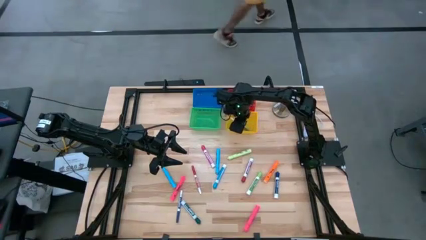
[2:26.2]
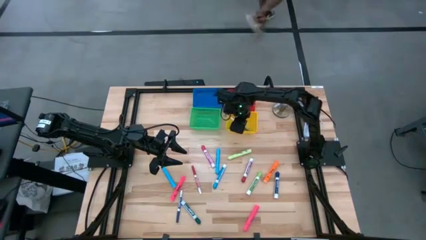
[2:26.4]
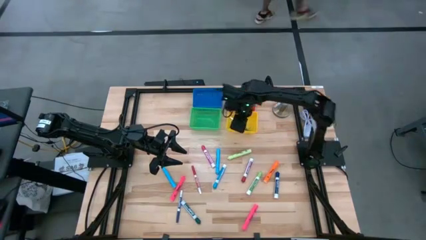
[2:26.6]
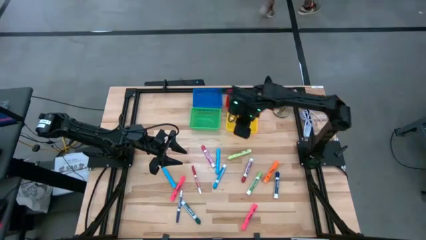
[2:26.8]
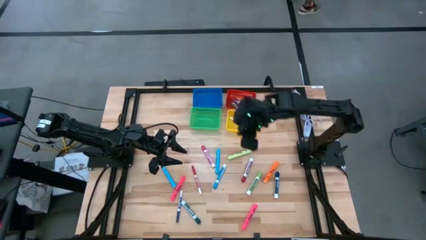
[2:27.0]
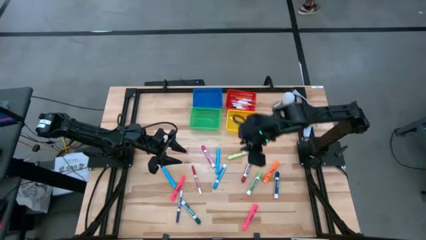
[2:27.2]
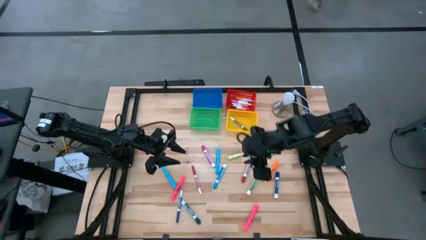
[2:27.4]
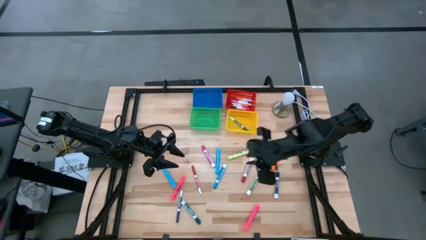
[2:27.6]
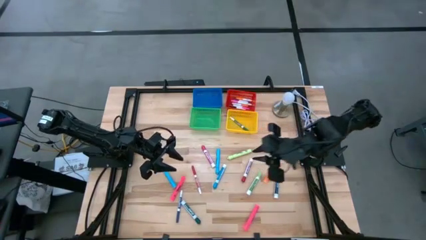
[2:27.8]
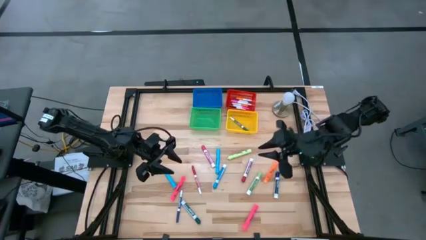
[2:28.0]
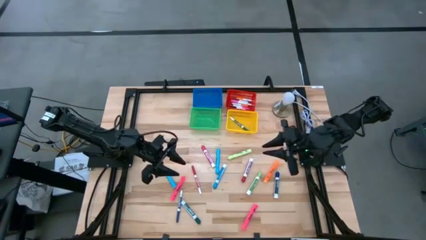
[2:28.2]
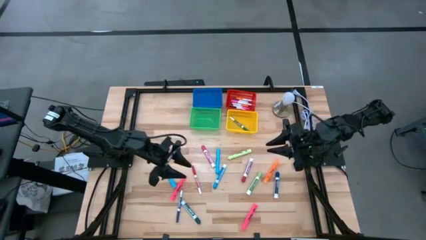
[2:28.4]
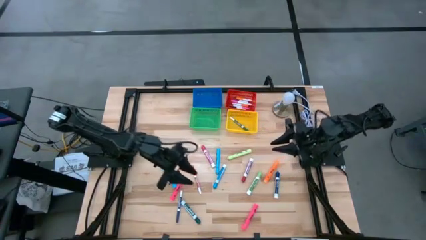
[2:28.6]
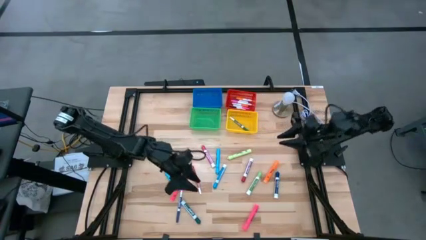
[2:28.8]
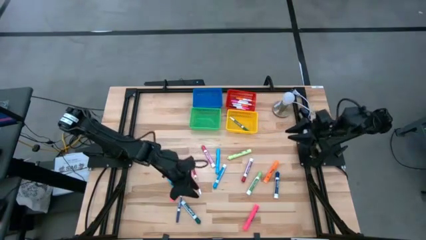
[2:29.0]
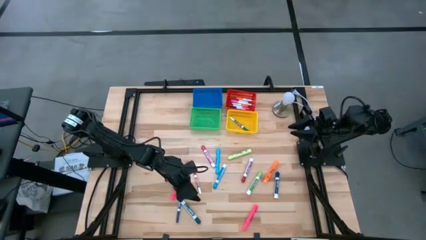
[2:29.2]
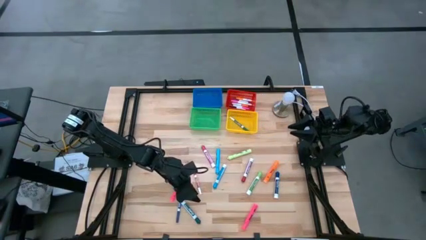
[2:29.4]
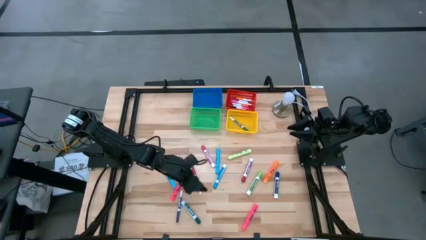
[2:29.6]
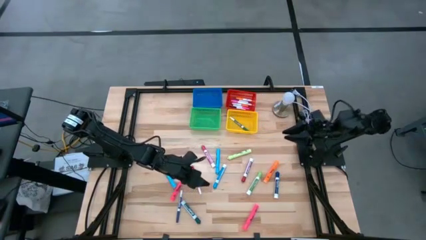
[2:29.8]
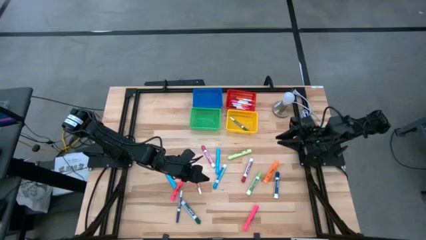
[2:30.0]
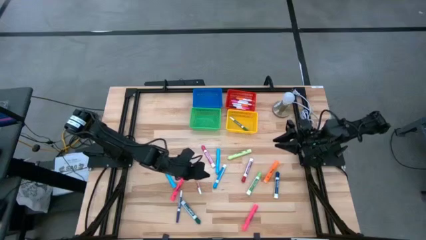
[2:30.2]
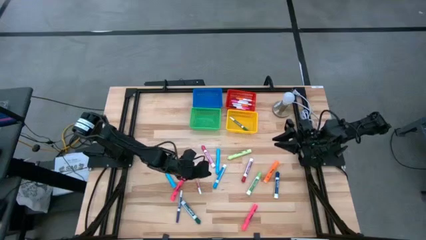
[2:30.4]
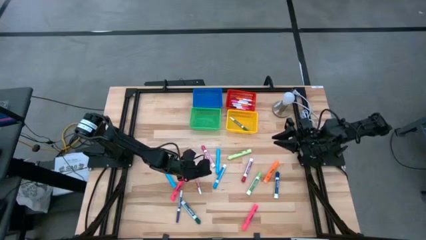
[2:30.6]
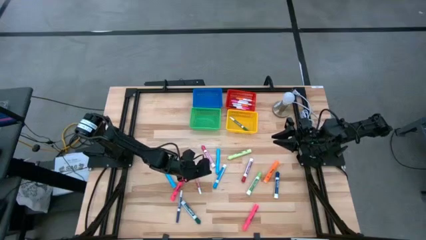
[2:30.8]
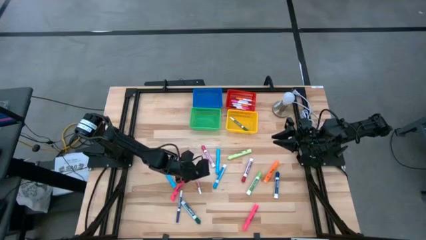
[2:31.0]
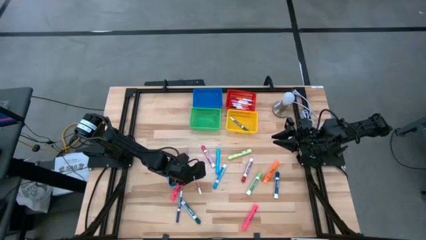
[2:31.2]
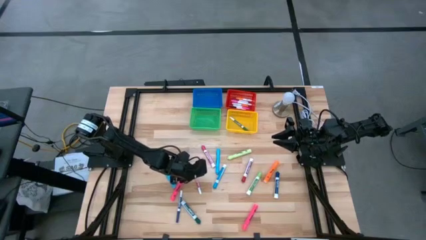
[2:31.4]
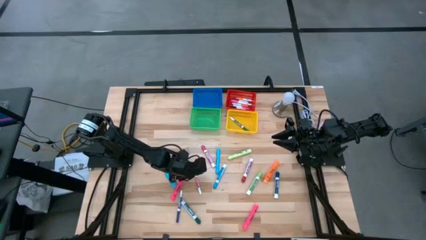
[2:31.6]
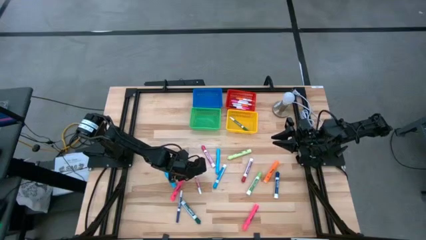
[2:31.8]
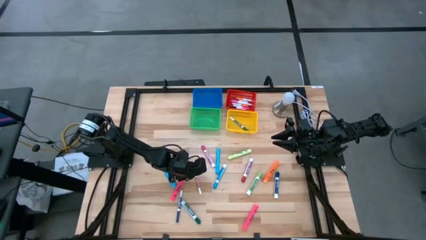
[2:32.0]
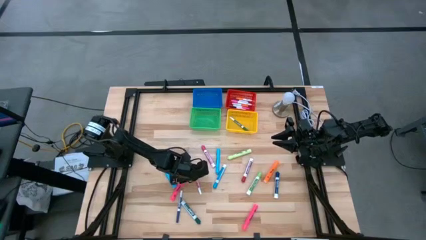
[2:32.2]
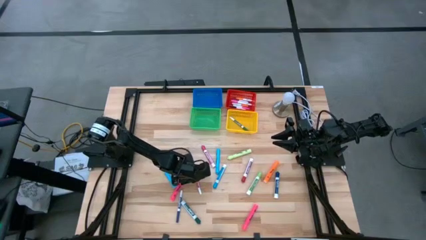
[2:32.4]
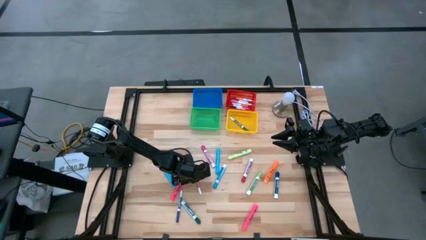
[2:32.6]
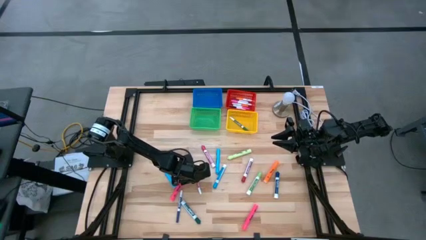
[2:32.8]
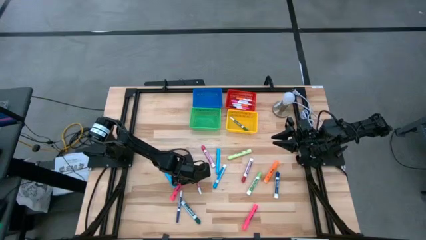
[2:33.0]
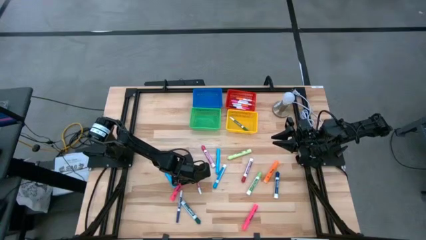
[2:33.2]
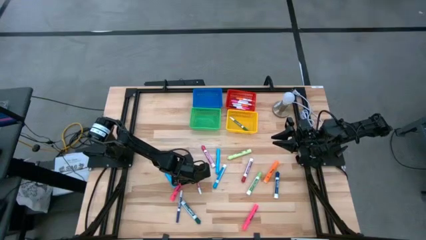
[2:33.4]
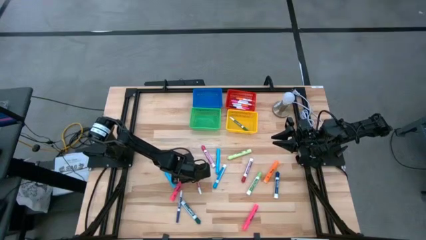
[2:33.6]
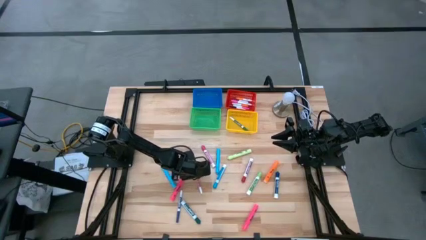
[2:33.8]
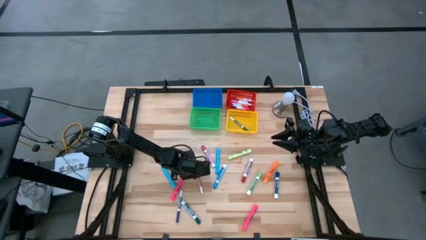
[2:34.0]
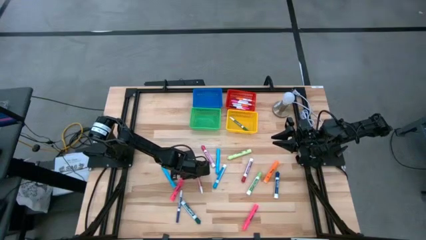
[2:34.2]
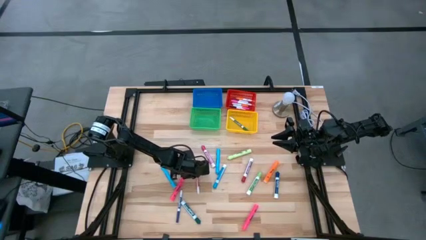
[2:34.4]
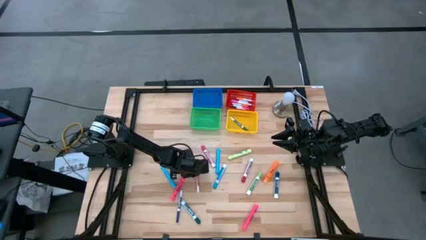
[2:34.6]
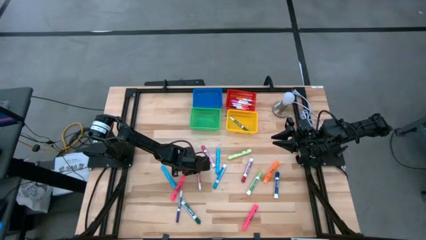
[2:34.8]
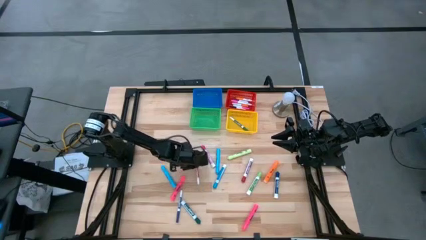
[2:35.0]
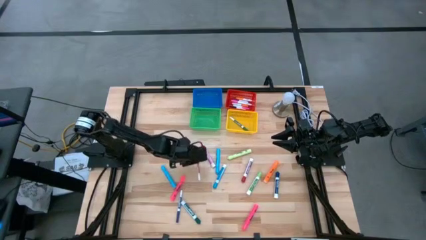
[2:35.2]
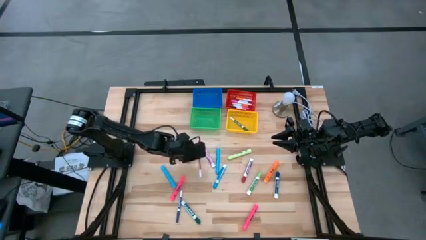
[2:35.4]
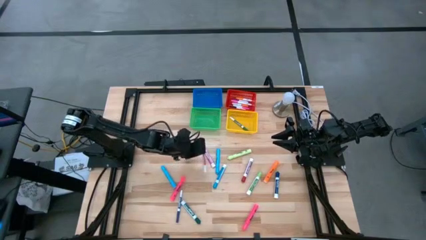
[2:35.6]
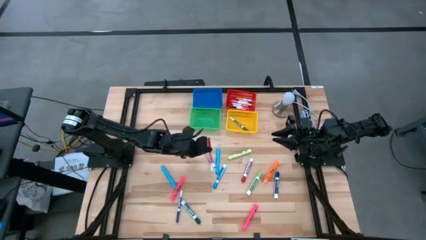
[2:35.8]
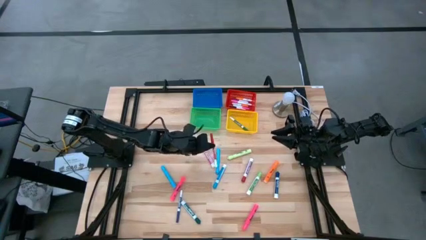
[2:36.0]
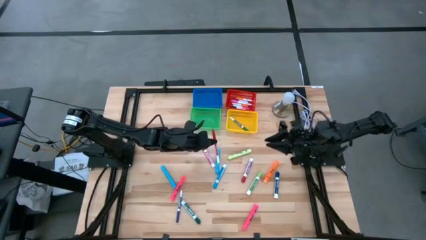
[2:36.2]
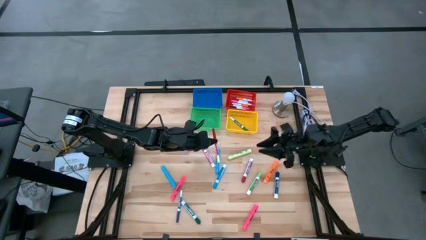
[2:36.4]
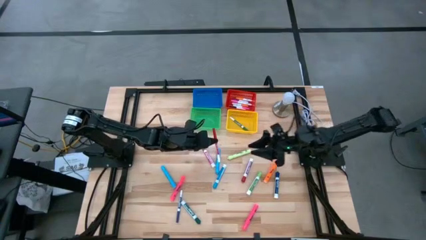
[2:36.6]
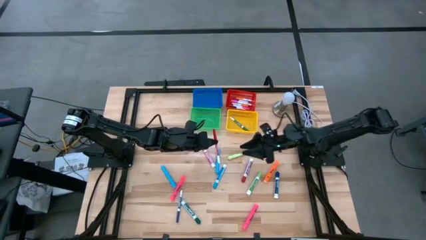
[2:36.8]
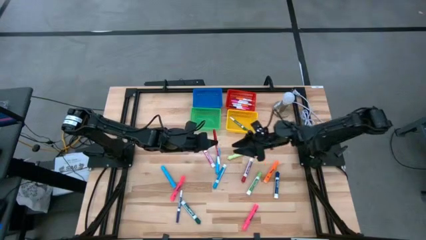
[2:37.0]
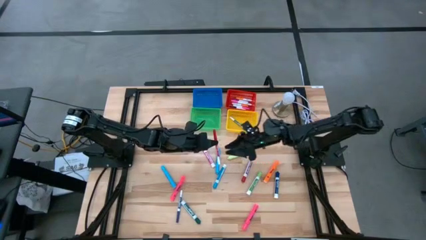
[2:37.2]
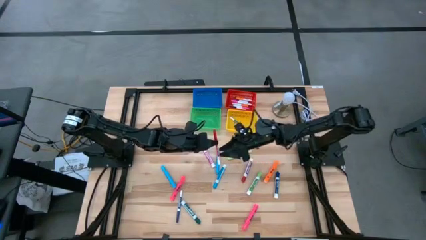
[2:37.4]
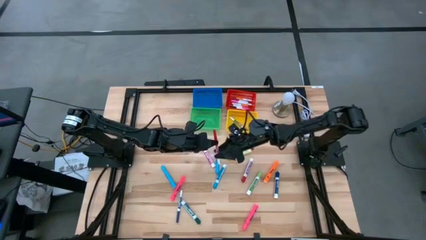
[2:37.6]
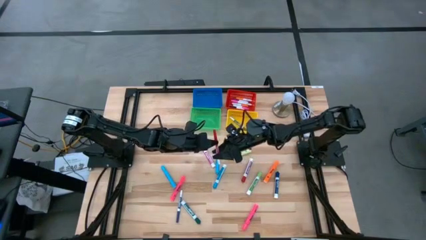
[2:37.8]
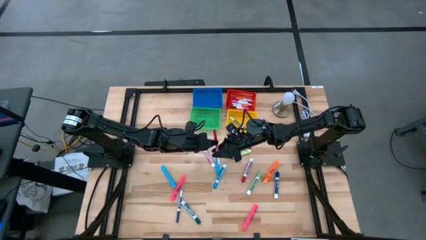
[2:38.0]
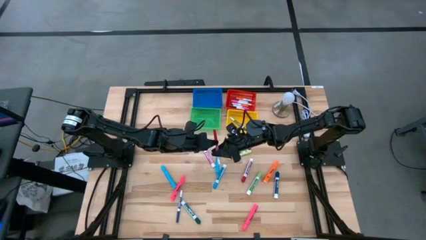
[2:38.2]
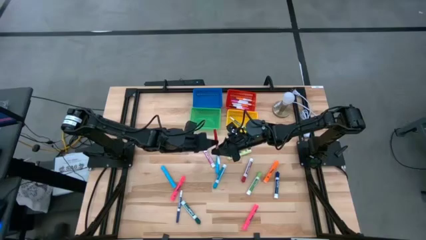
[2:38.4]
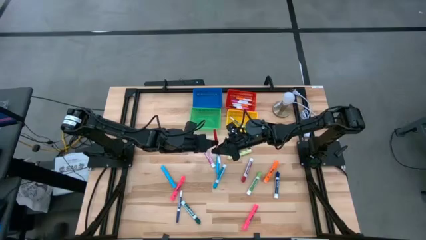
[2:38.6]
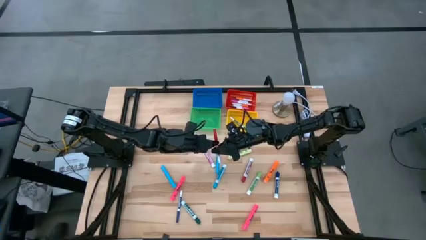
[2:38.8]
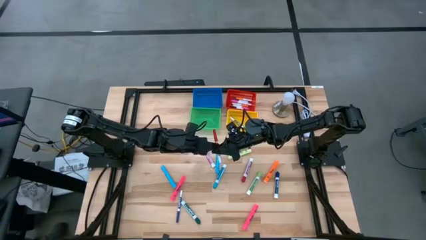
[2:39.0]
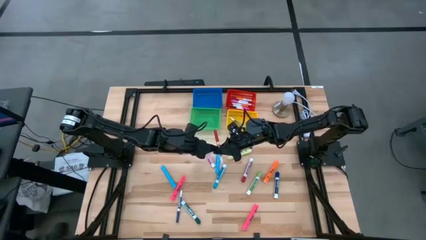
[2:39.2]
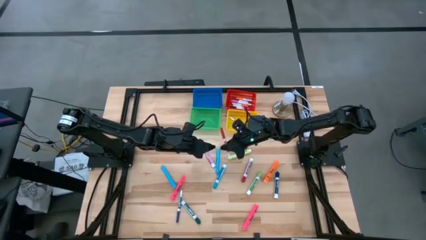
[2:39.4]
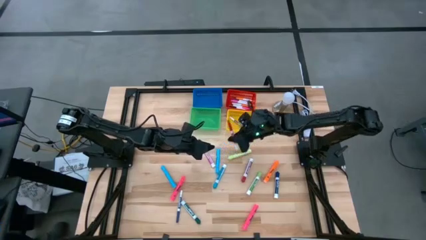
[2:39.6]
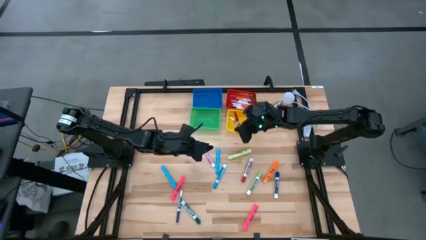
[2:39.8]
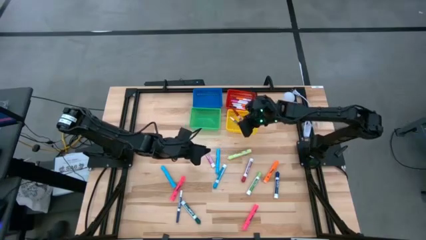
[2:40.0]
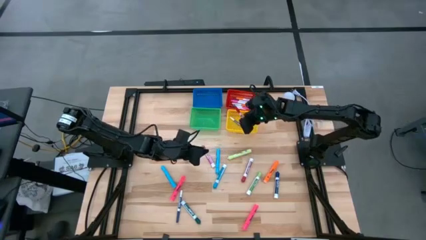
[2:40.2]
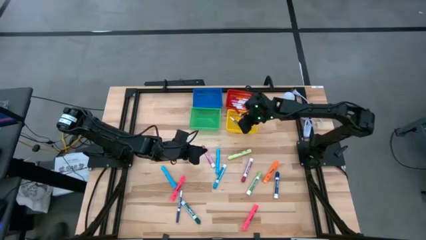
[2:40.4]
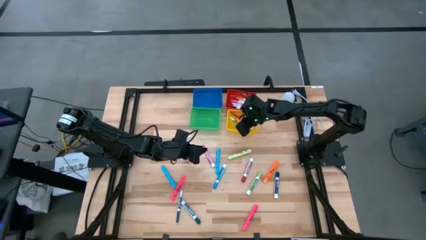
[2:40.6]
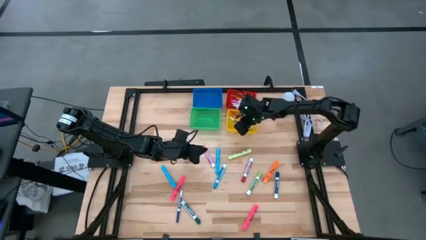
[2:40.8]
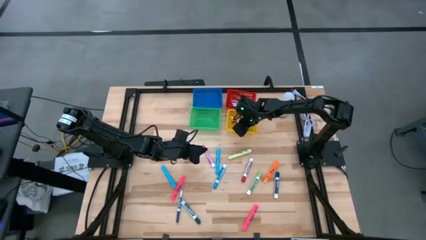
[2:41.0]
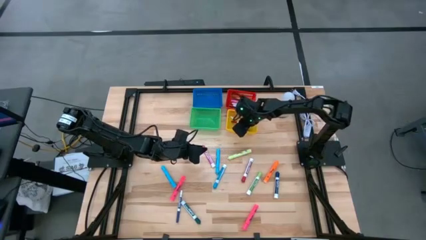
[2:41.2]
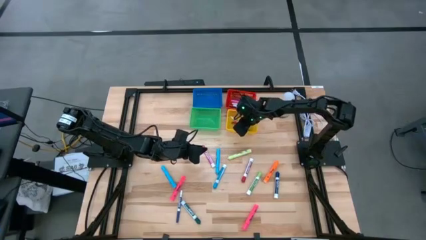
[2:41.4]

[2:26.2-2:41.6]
Task: Pick & Place Markers
Put the small red marker into the yellow basket
